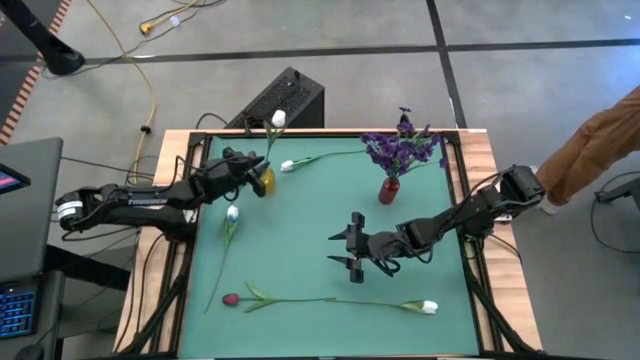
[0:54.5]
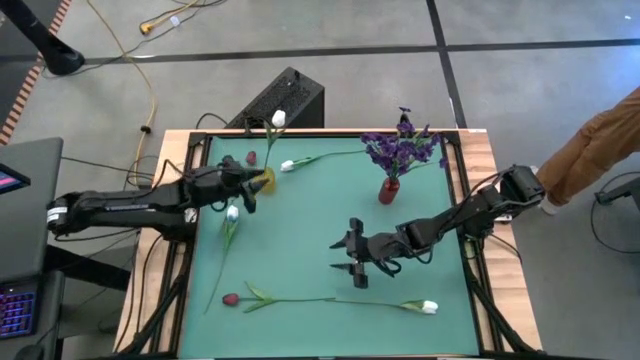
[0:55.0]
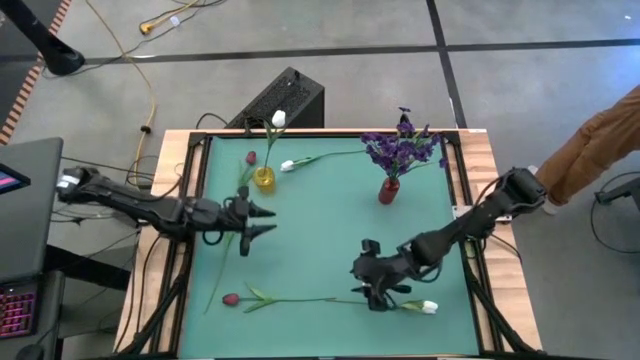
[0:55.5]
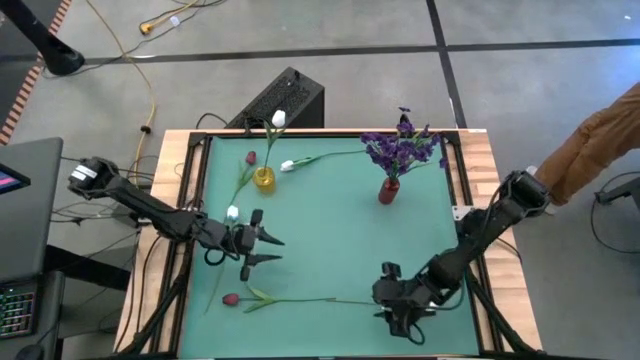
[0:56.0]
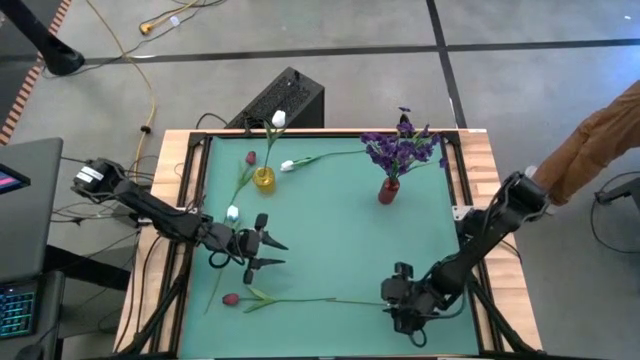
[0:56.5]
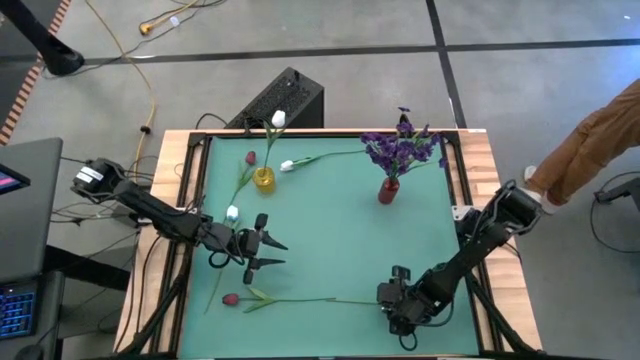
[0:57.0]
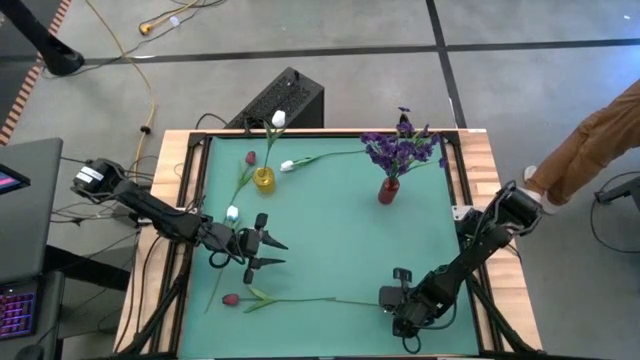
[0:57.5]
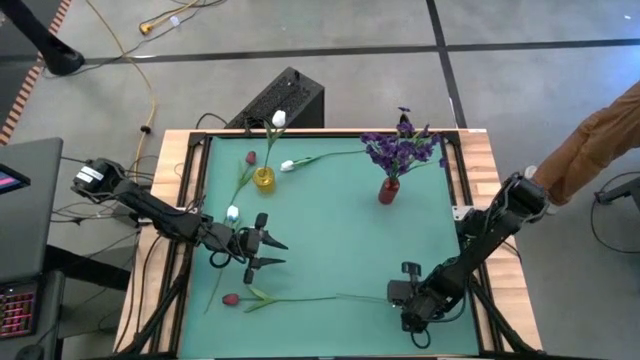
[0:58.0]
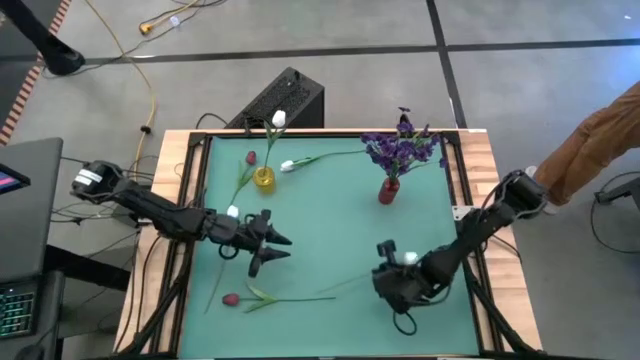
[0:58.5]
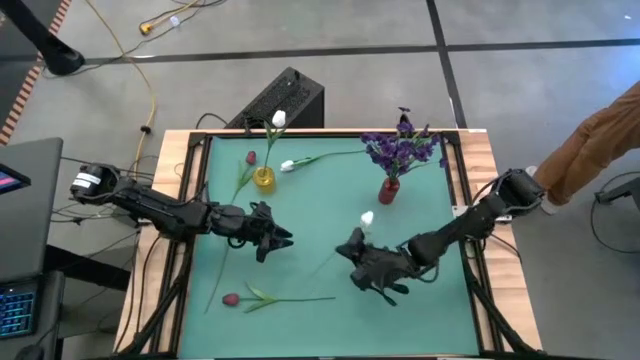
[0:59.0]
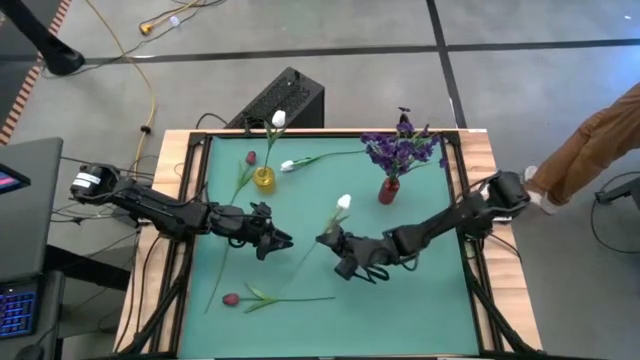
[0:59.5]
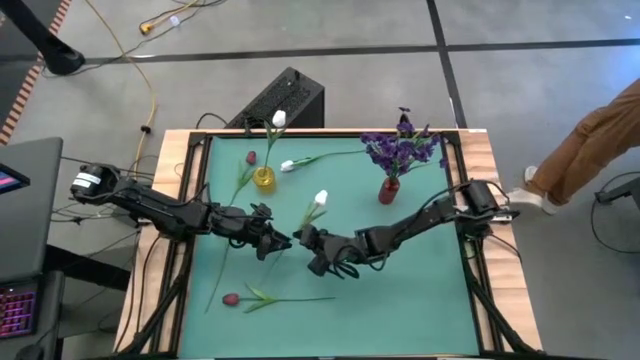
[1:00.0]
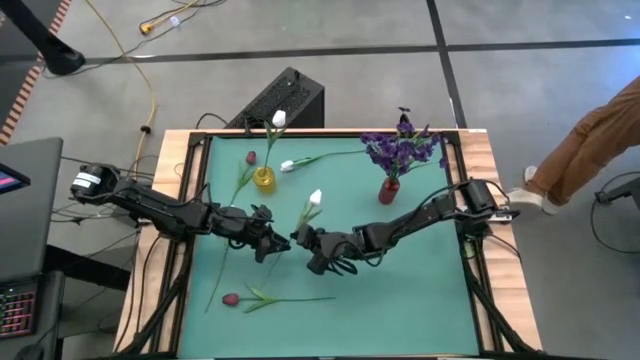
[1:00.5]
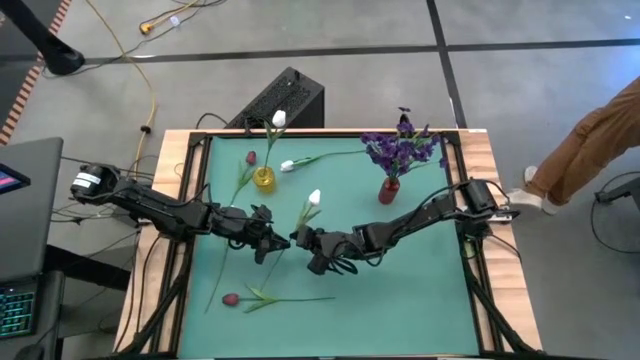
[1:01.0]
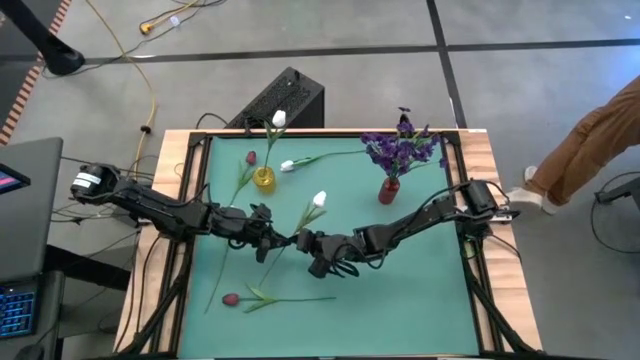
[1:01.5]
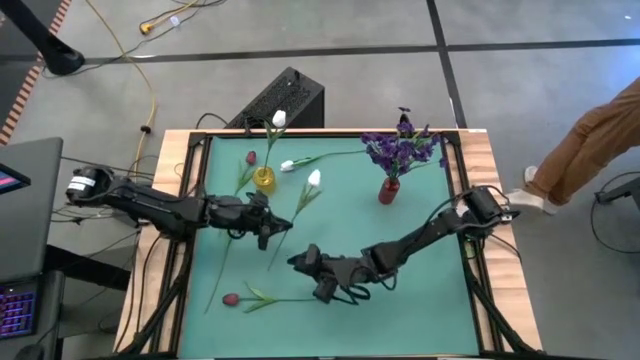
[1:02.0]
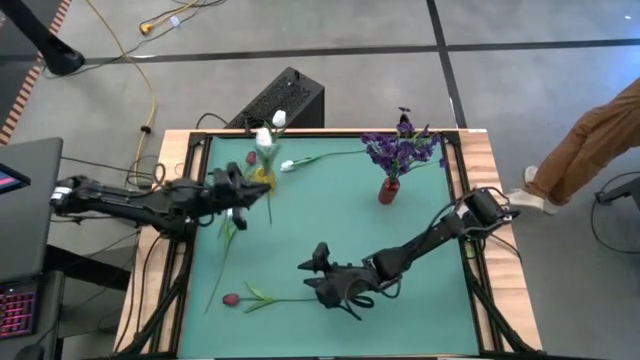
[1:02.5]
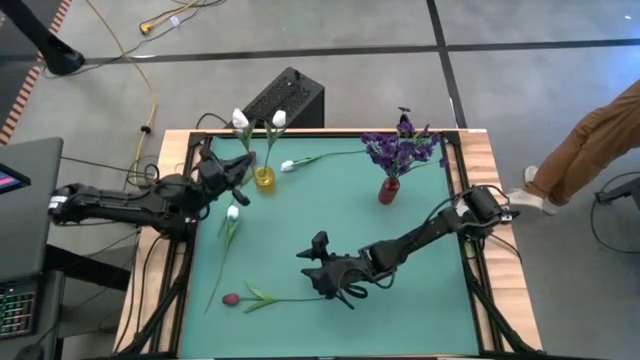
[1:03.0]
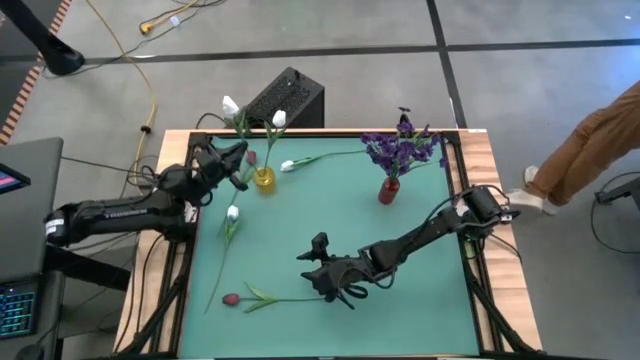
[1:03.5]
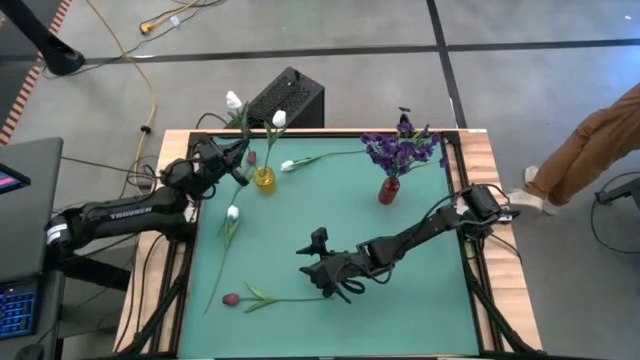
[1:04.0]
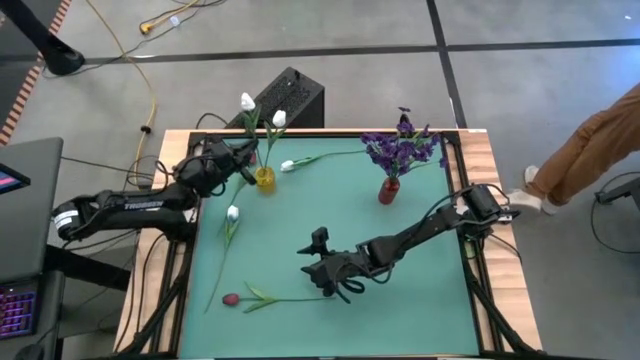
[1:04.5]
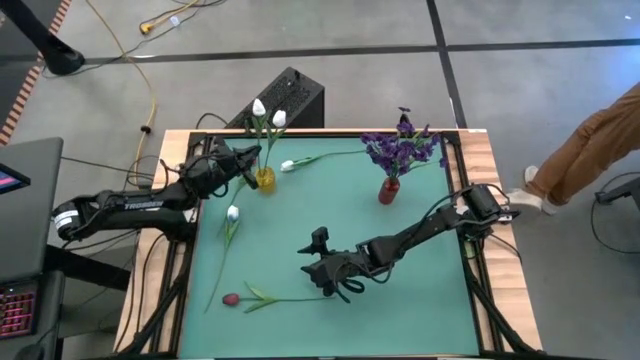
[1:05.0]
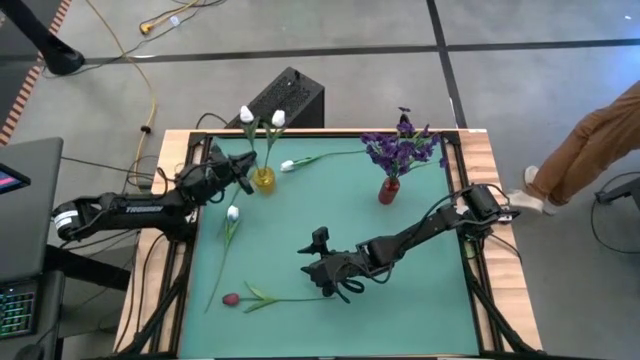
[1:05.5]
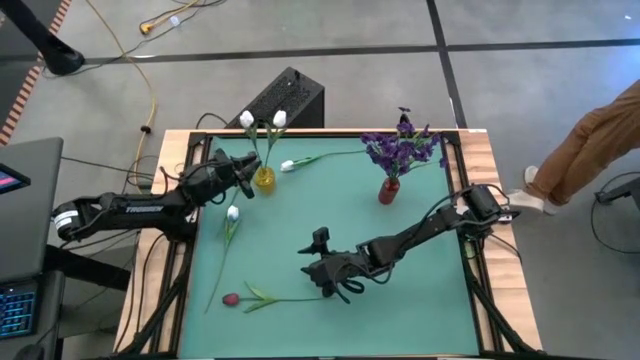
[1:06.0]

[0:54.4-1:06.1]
Task: Sort flowers into vase by color
Put the bottom right white flower into the yellow vase

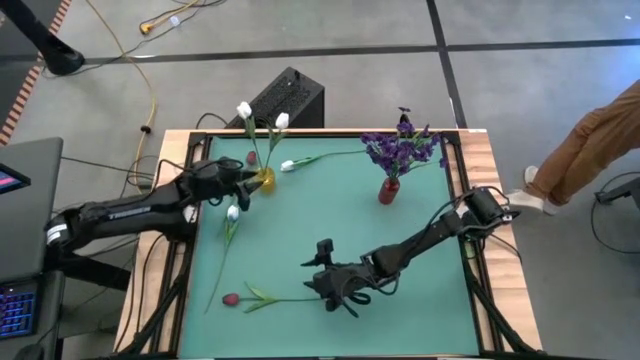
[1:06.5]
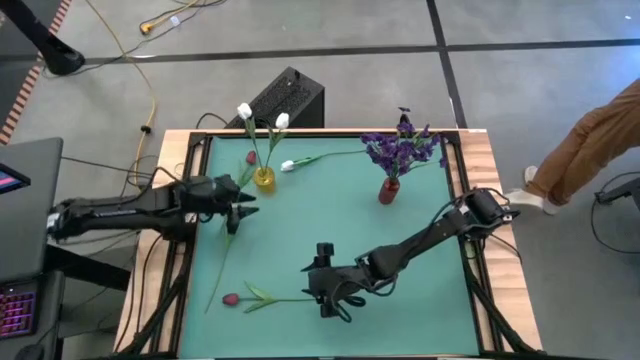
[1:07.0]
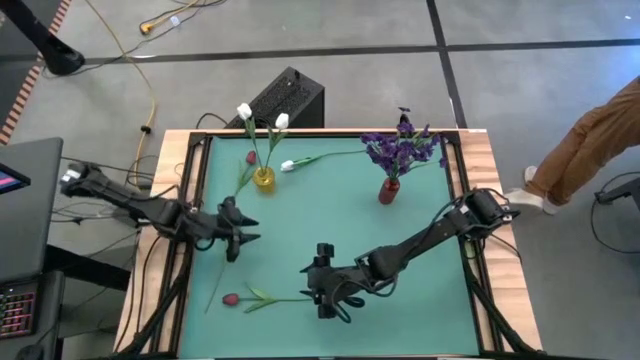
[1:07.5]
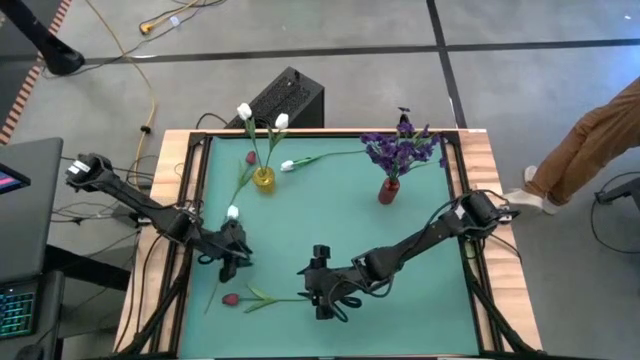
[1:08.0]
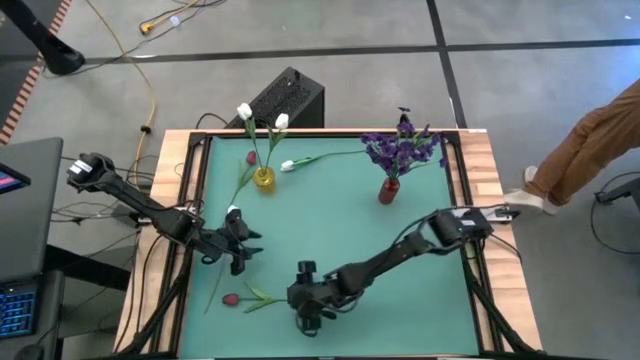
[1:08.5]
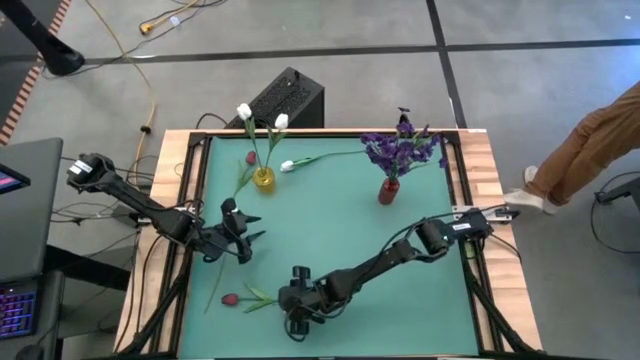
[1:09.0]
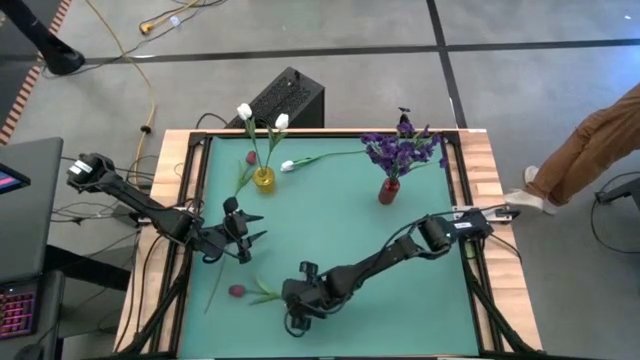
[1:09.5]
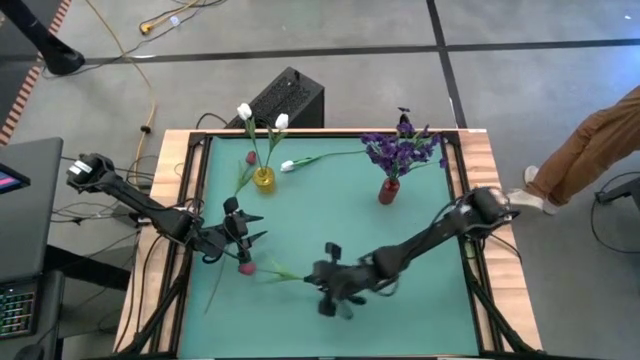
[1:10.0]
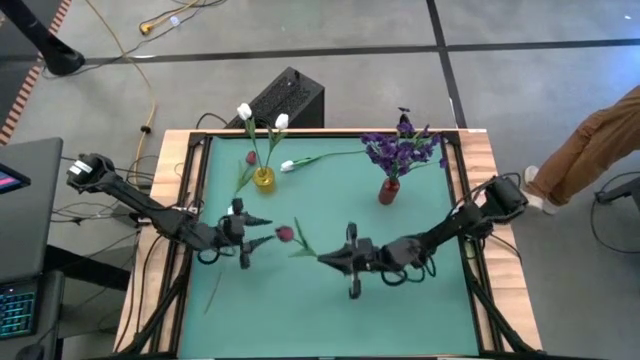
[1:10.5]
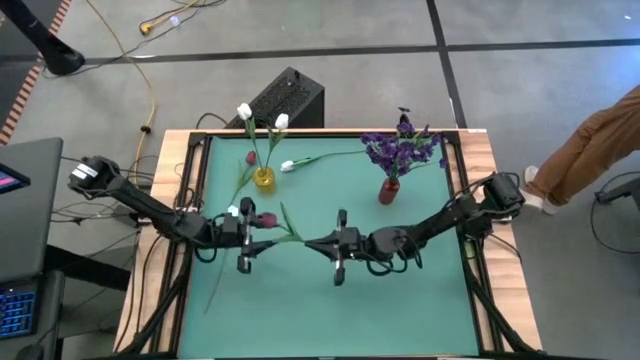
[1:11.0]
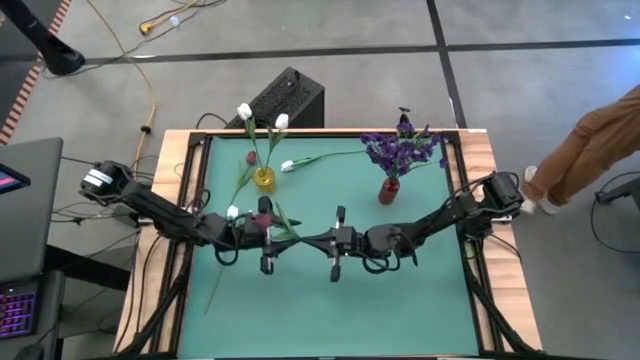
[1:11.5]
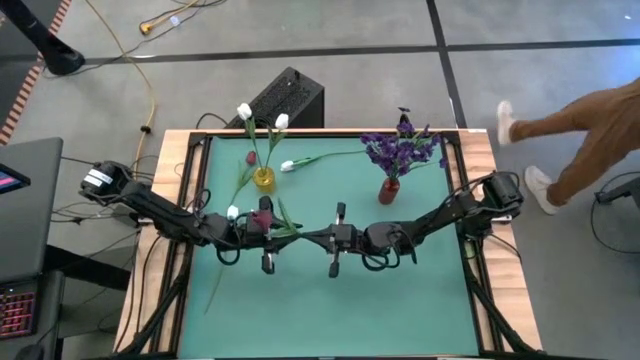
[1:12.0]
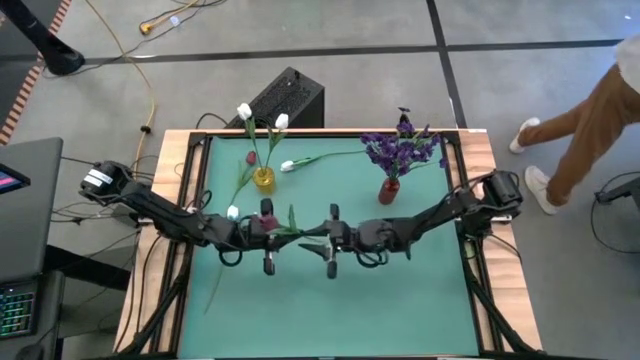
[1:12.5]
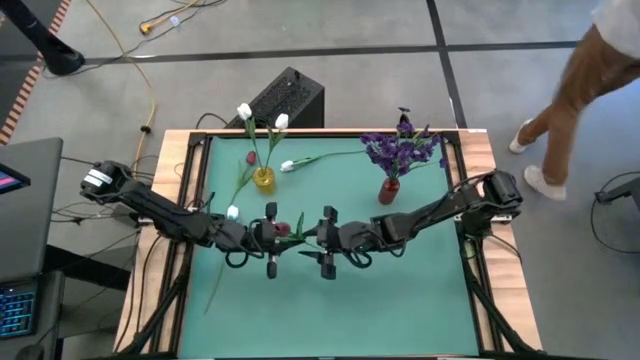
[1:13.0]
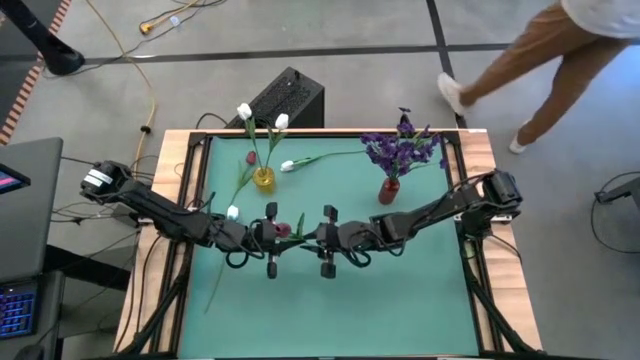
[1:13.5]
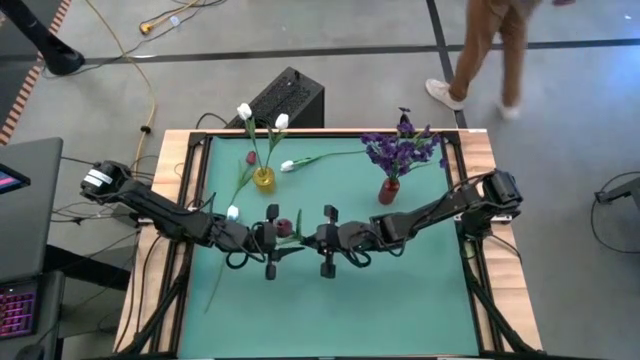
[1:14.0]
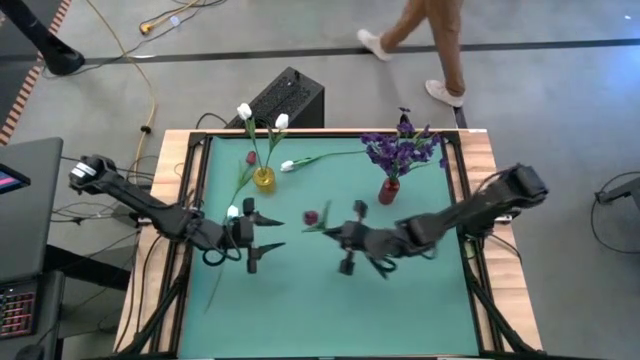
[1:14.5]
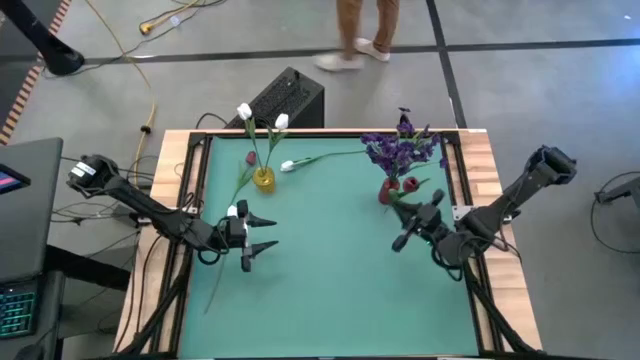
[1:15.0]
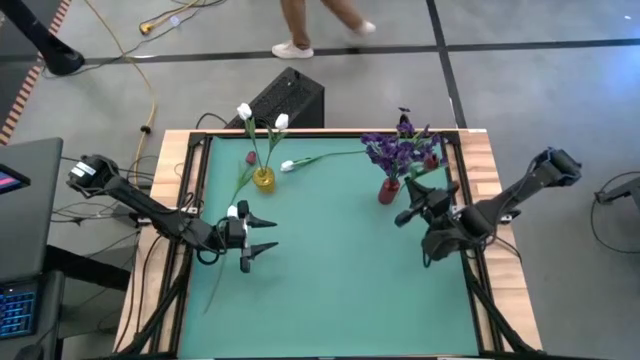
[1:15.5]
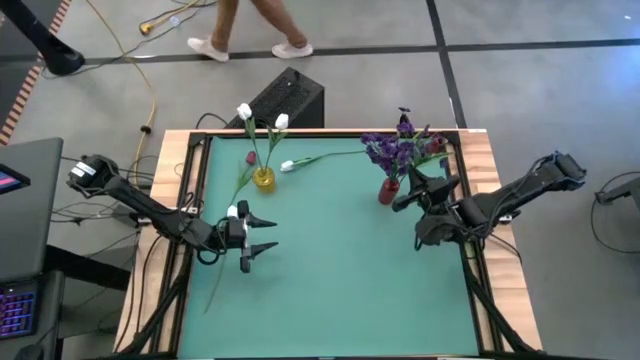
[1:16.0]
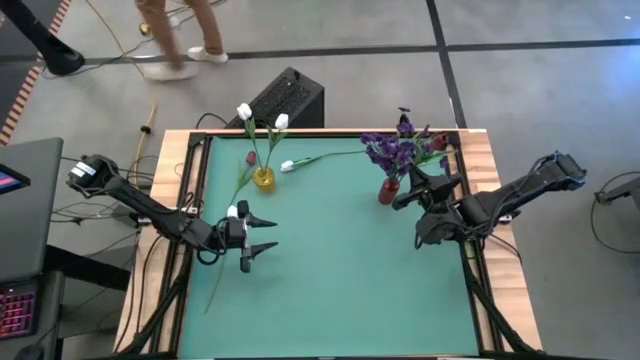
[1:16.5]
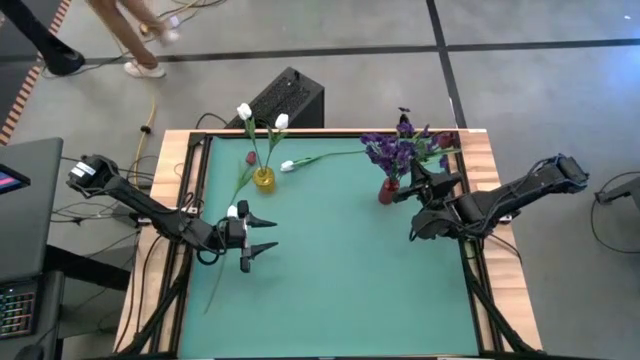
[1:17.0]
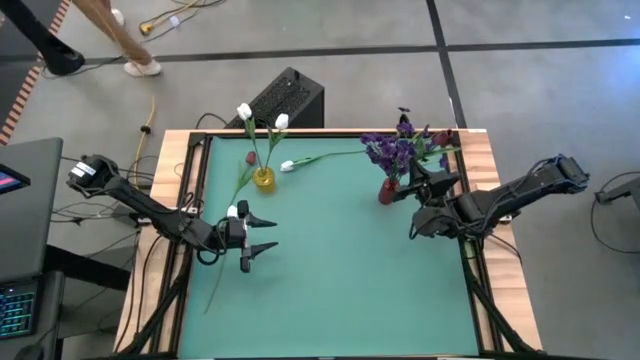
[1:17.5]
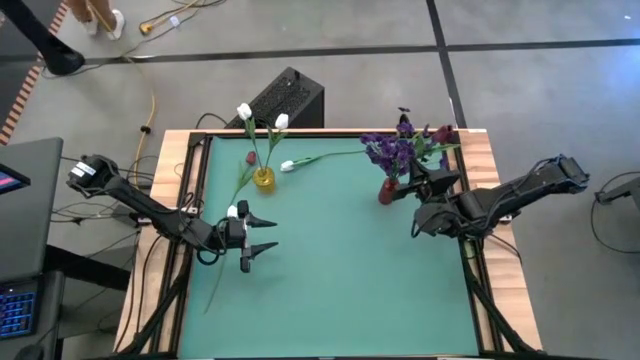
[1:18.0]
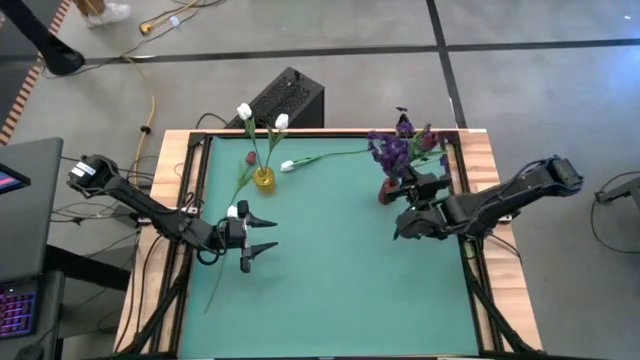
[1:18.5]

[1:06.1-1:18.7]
Put the bottom red flower into the red vase
